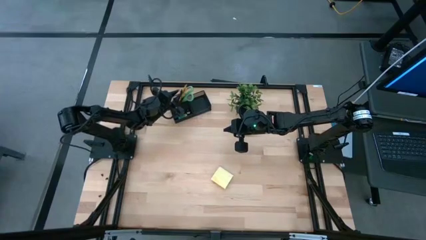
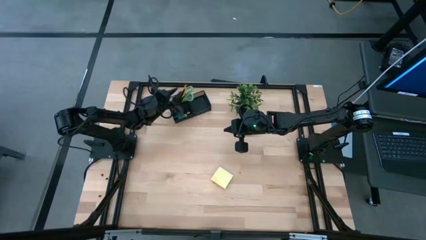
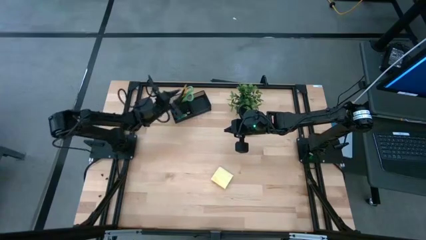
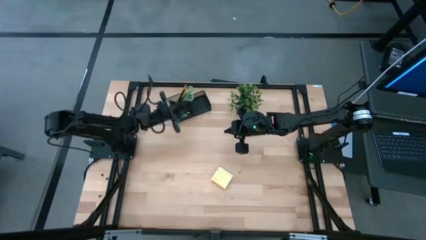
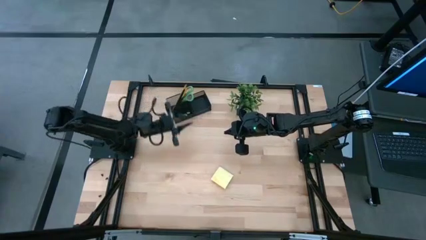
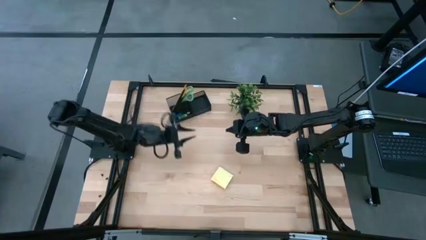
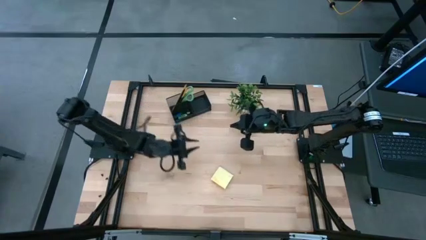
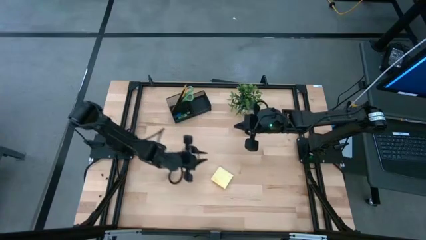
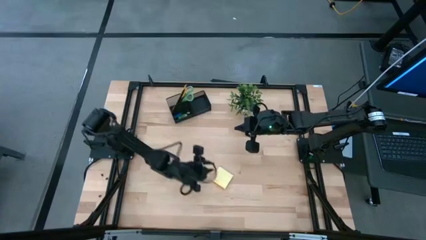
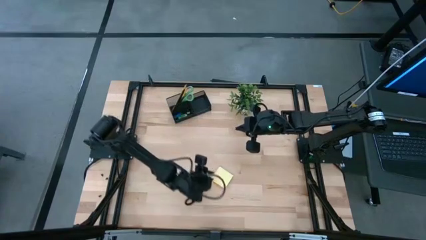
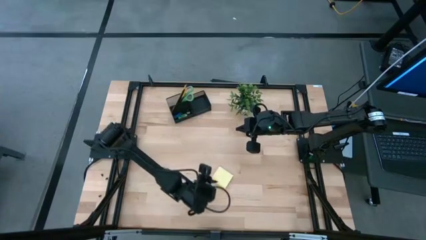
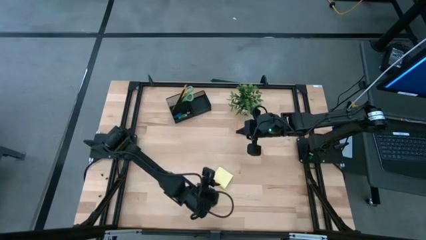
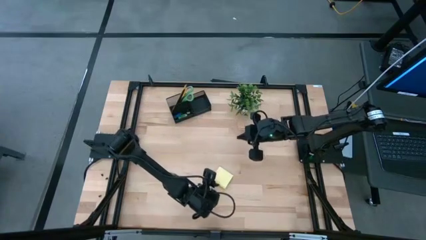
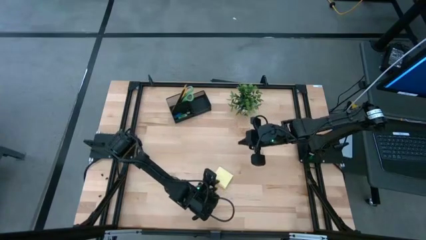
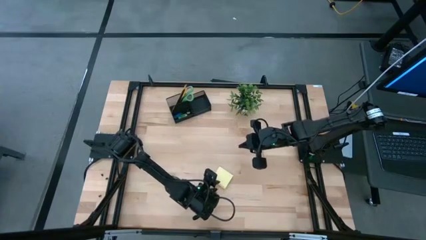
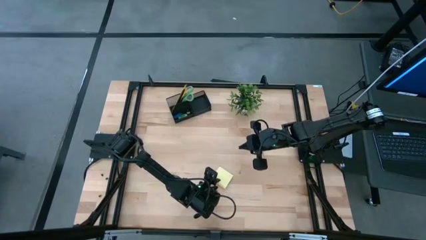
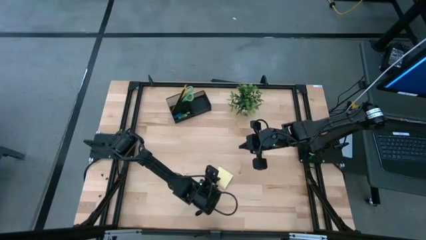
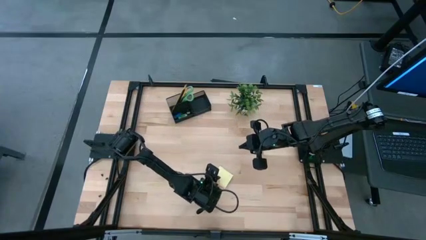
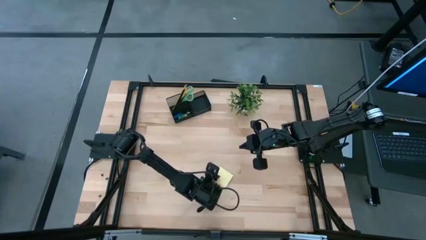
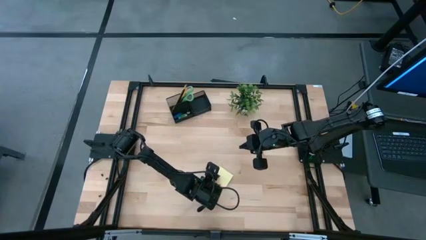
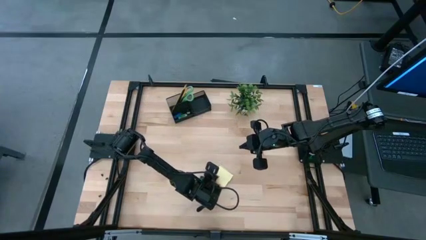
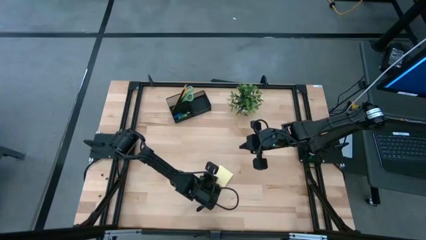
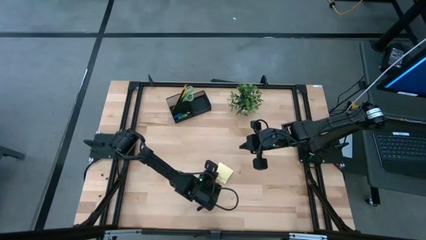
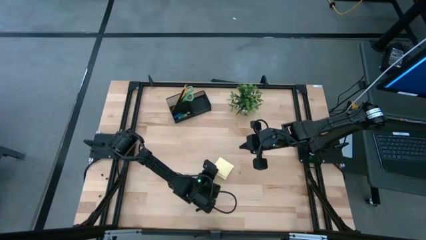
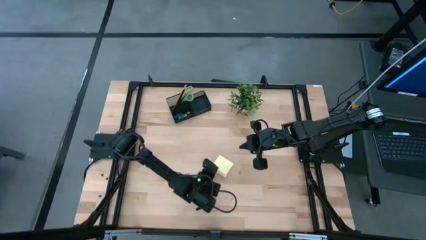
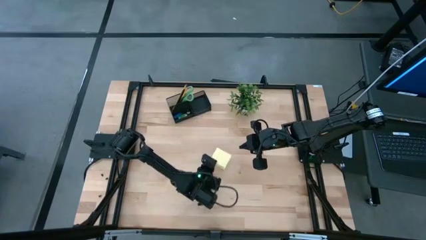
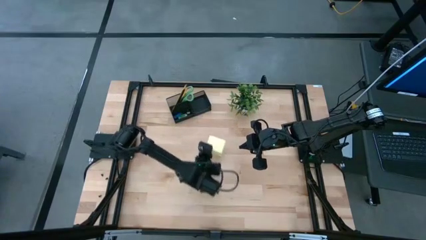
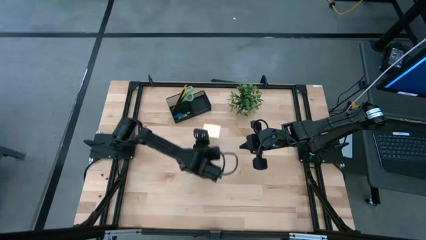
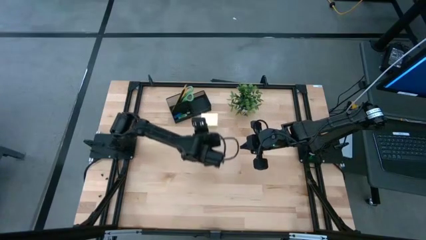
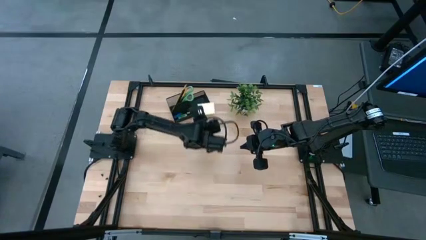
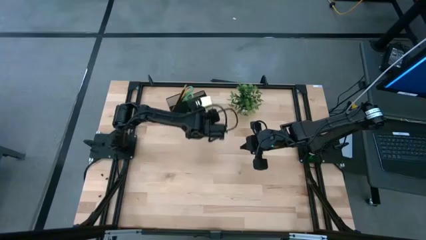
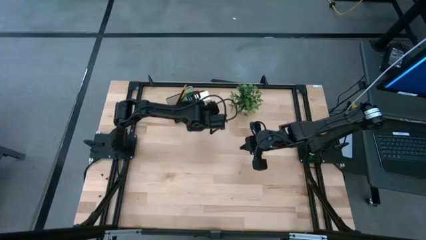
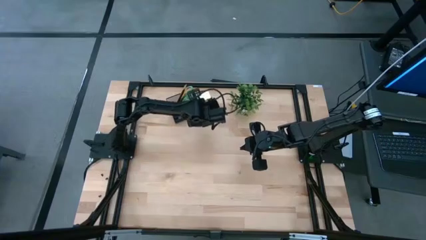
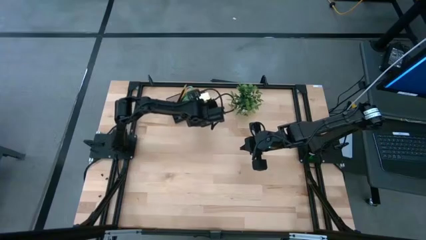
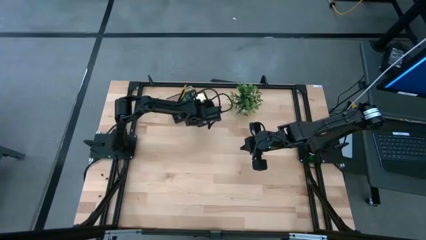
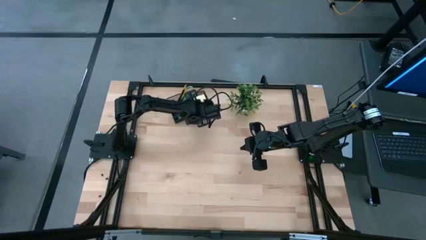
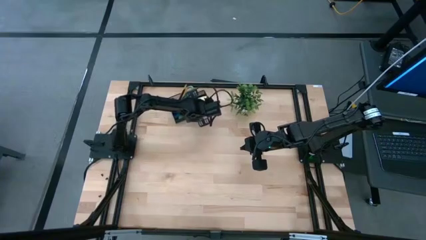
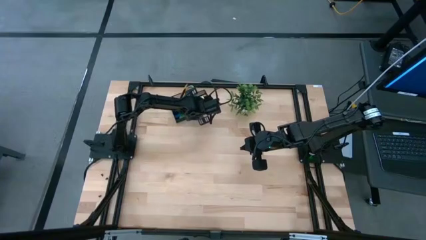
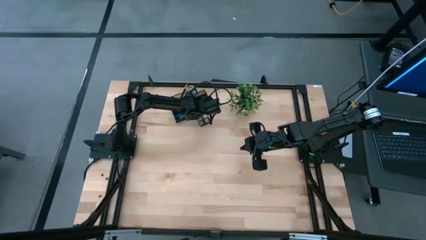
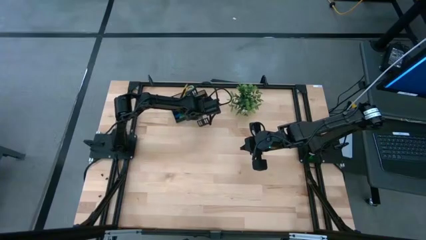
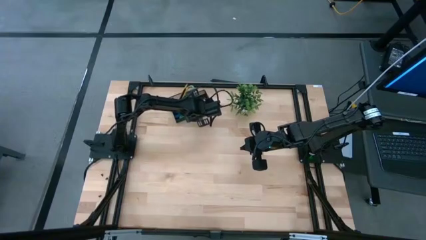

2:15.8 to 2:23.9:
Task: Pick and place office supplies into organizer
Put the sticky notes into the desk organizer

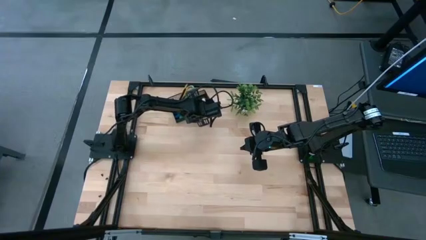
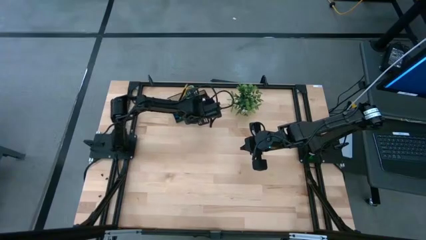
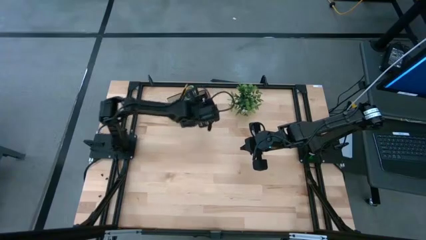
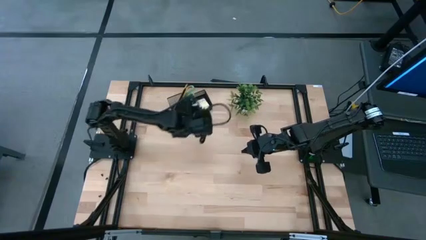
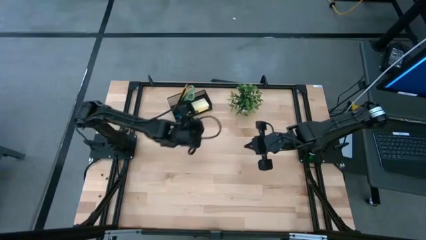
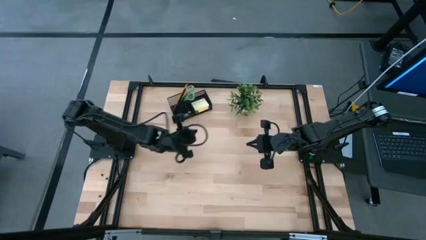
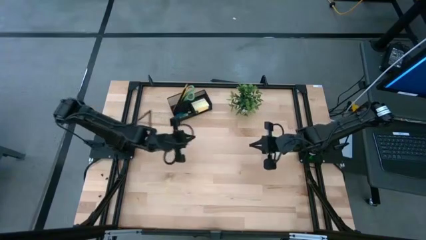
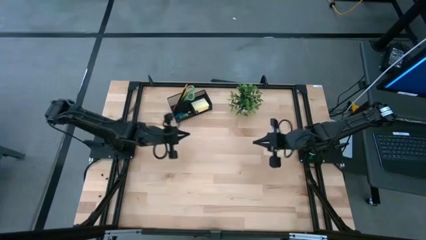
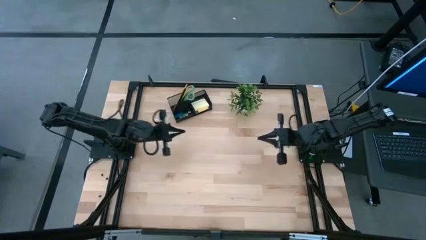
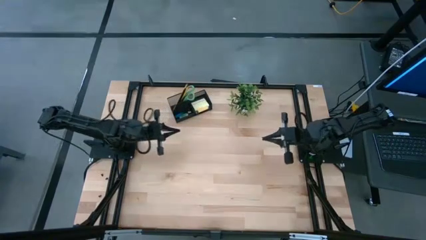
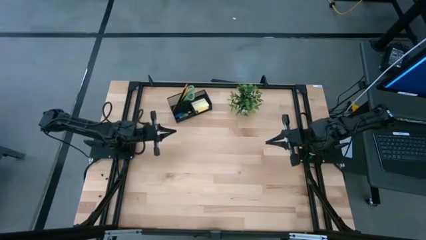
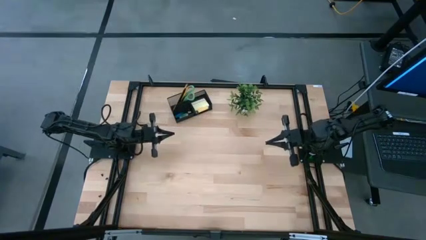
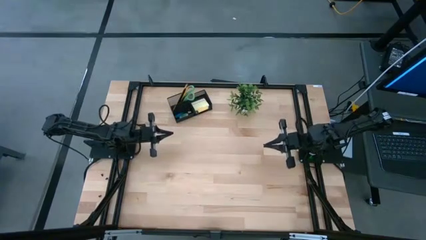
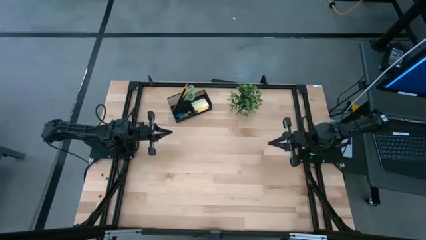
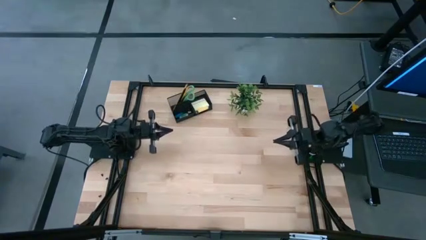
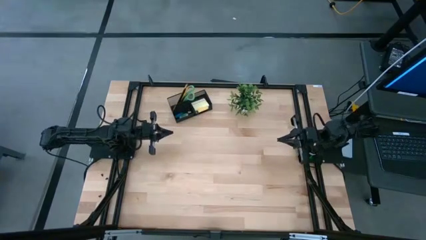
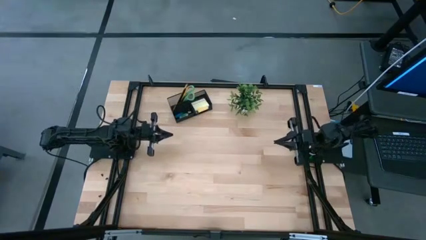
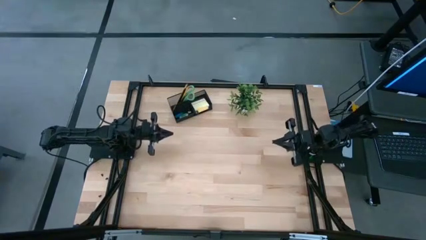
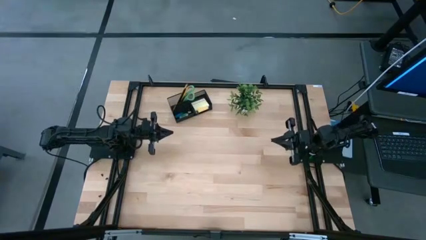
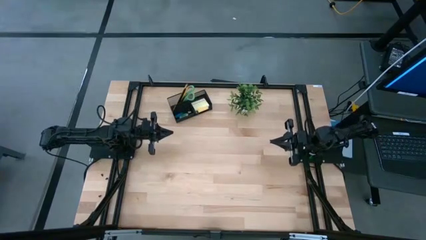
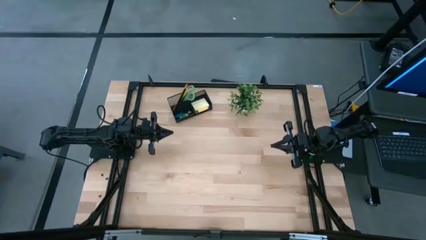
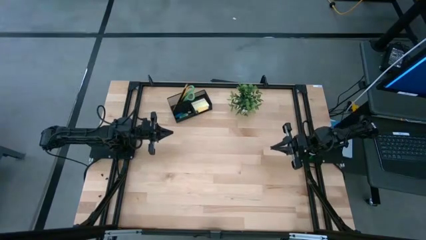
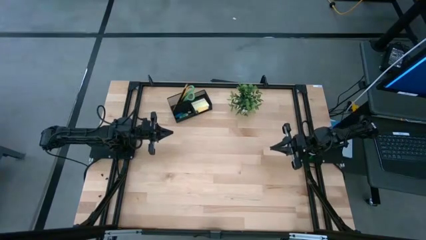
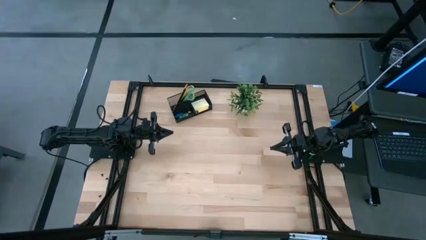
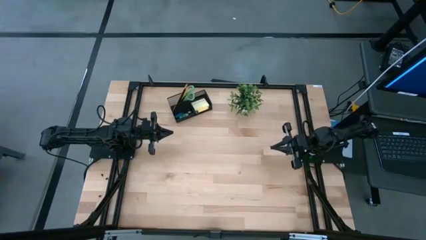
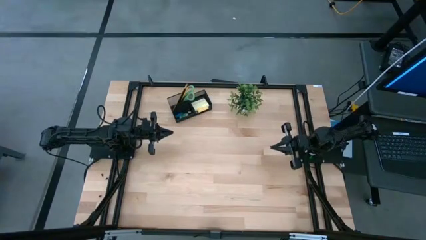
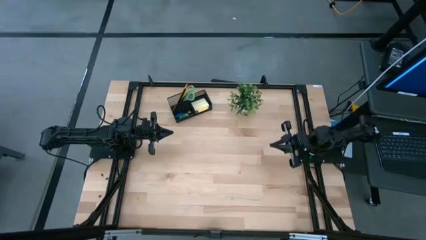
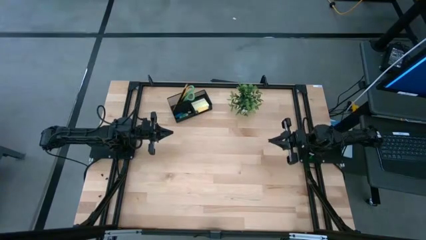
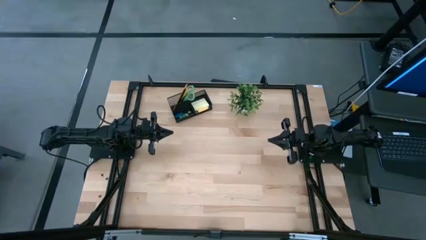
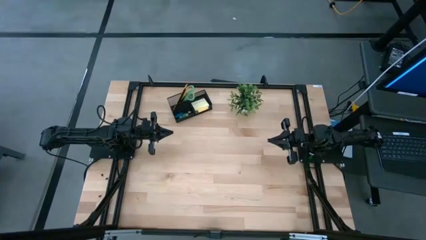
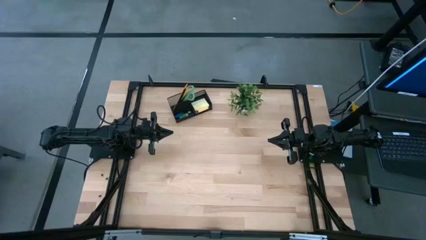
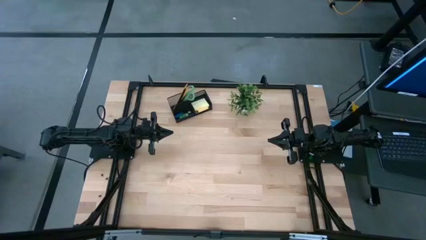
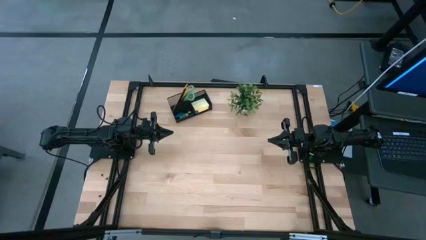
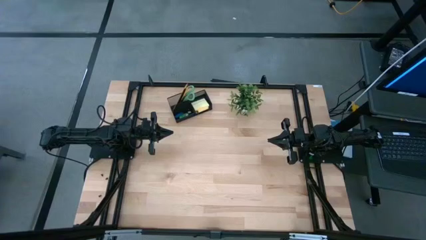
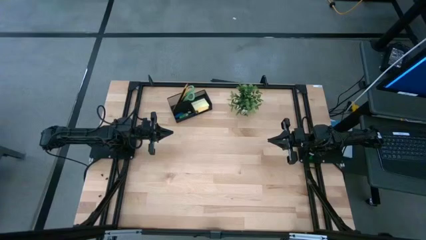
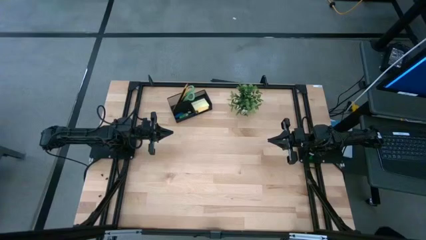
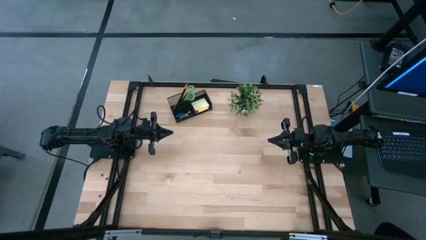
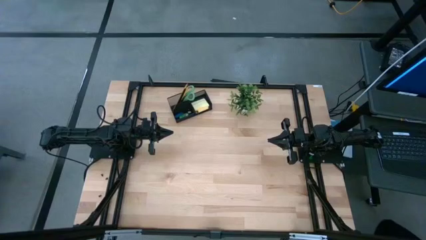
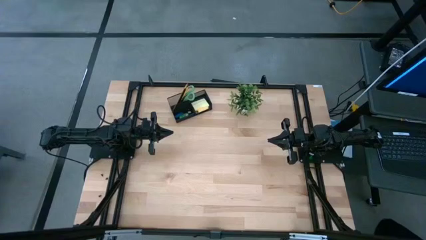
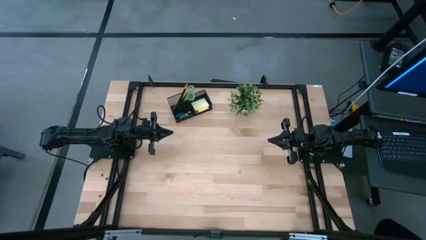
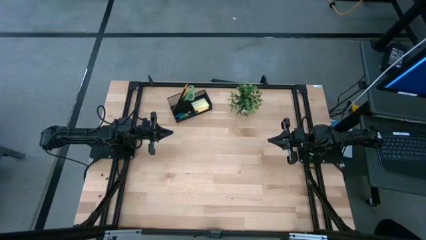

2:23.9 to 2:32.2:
Return to Home Position
